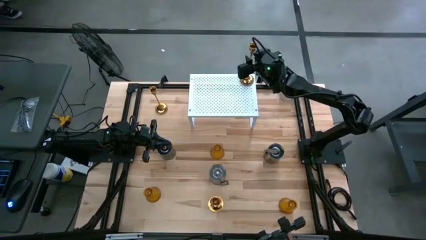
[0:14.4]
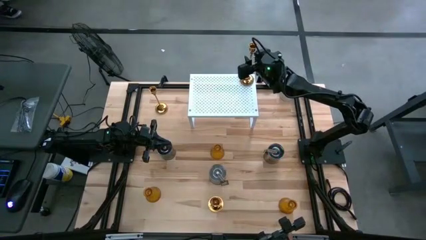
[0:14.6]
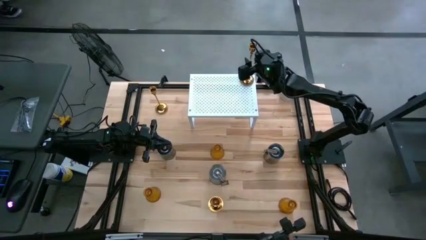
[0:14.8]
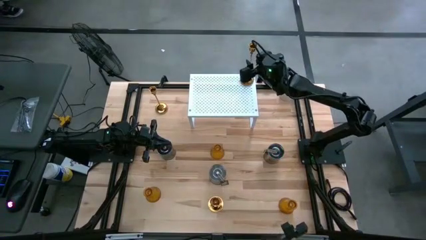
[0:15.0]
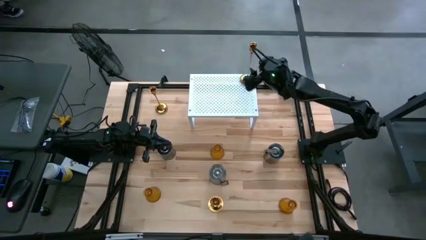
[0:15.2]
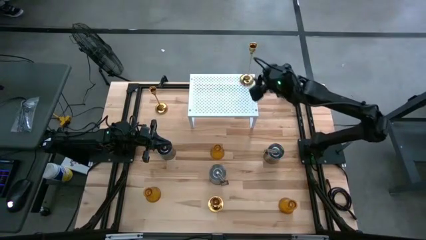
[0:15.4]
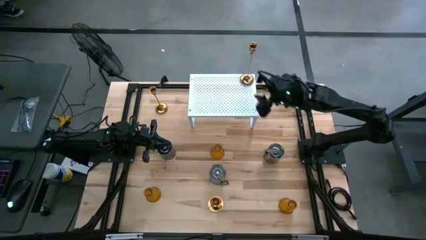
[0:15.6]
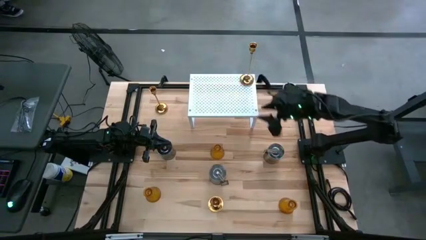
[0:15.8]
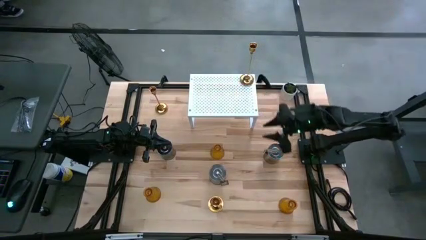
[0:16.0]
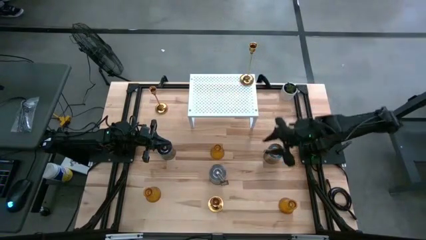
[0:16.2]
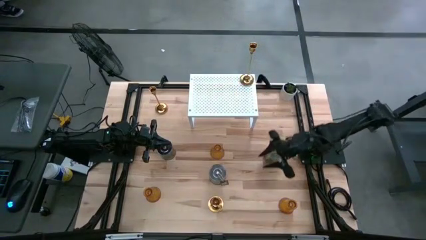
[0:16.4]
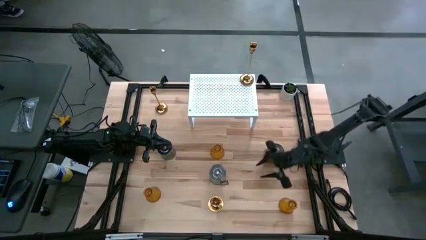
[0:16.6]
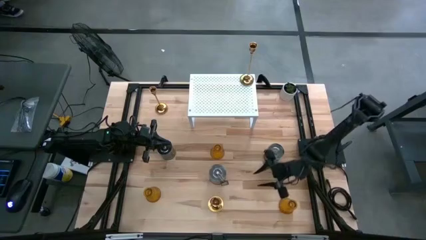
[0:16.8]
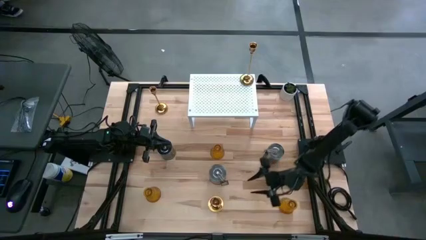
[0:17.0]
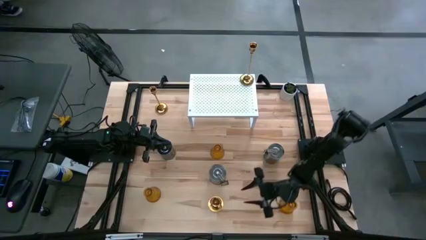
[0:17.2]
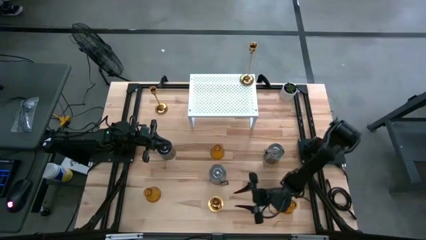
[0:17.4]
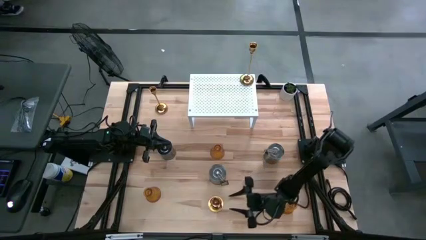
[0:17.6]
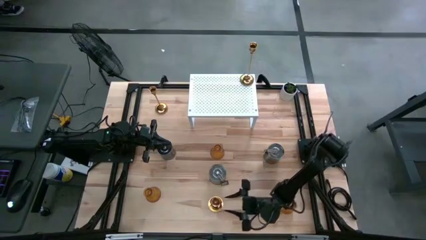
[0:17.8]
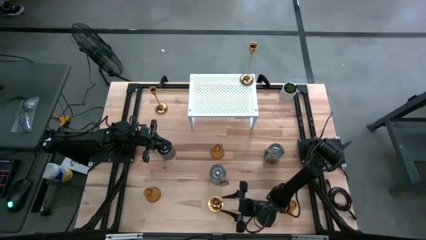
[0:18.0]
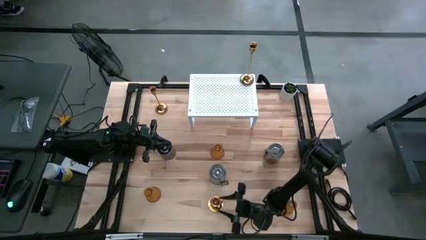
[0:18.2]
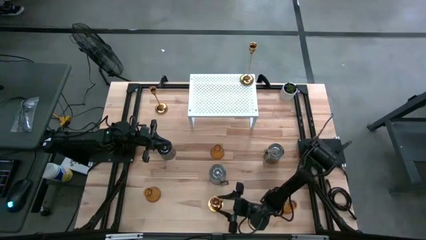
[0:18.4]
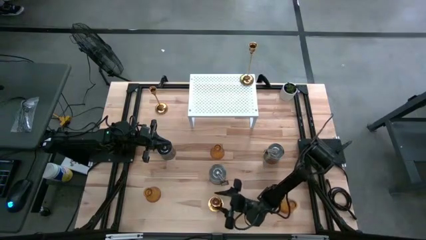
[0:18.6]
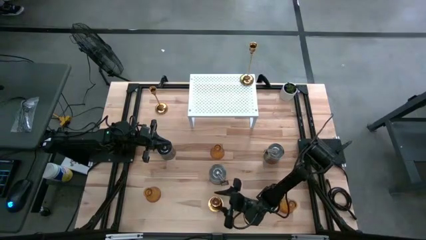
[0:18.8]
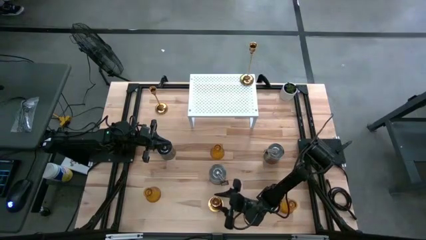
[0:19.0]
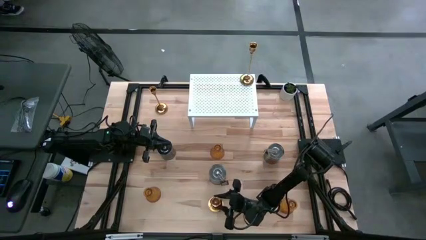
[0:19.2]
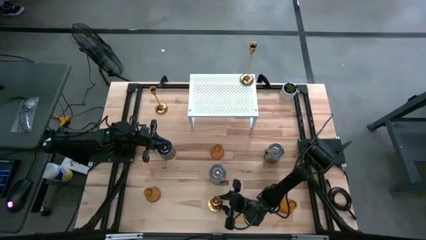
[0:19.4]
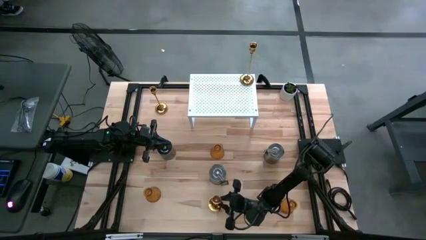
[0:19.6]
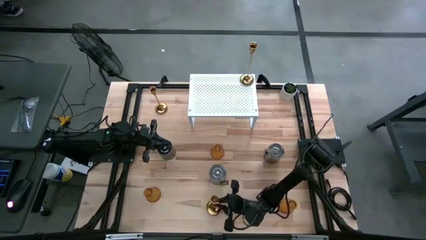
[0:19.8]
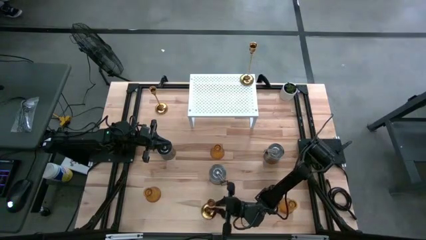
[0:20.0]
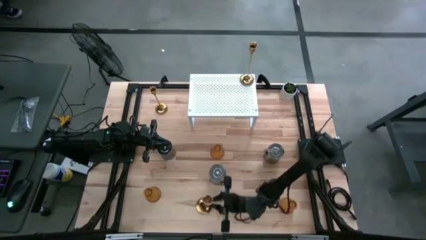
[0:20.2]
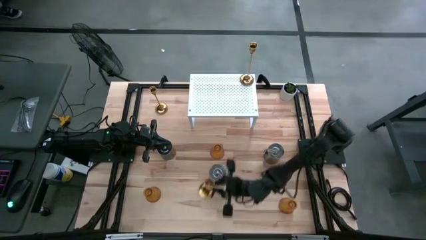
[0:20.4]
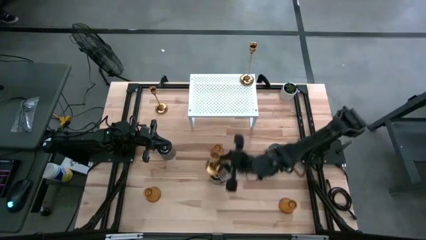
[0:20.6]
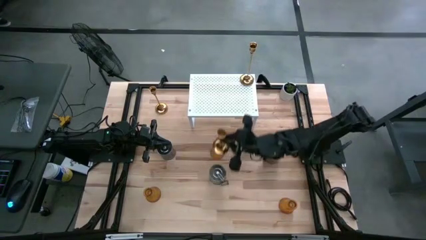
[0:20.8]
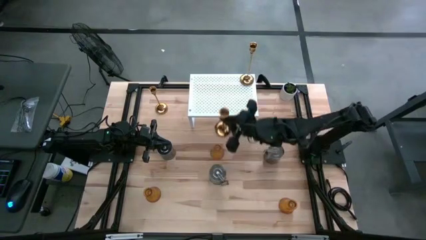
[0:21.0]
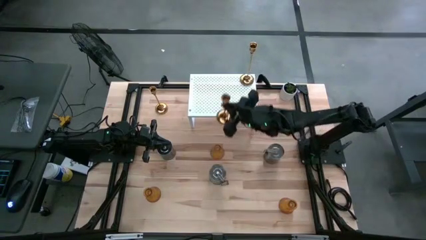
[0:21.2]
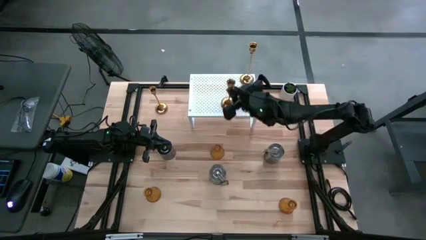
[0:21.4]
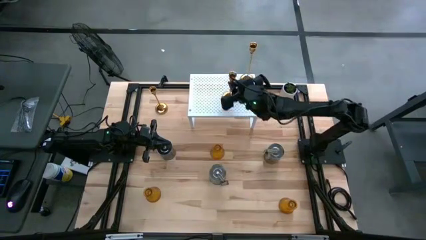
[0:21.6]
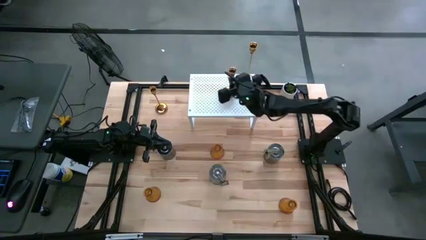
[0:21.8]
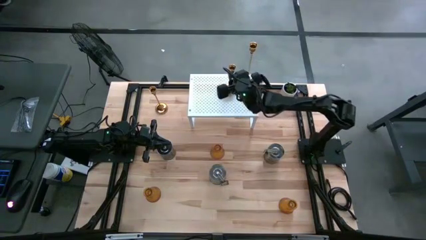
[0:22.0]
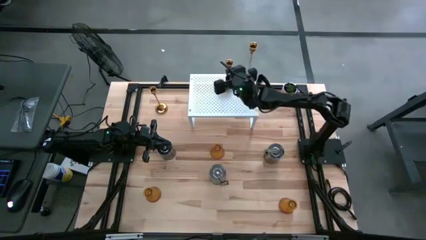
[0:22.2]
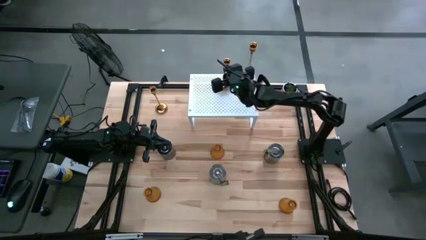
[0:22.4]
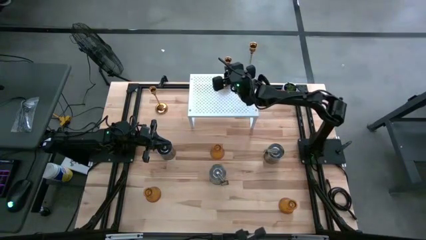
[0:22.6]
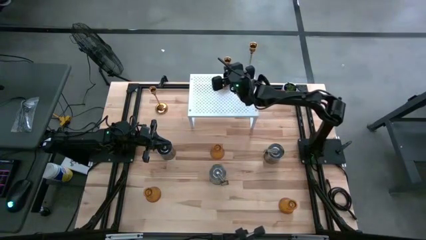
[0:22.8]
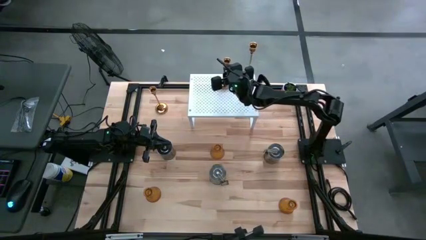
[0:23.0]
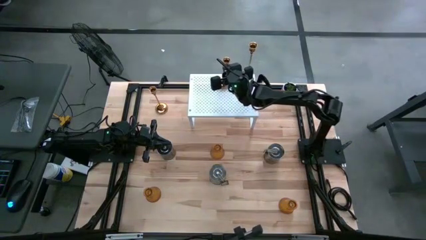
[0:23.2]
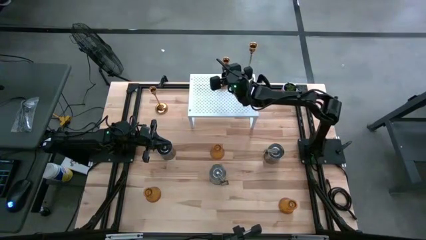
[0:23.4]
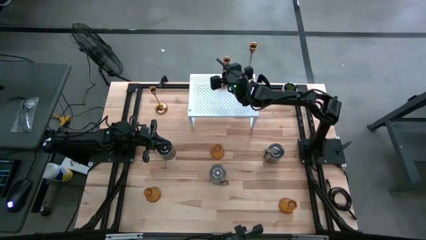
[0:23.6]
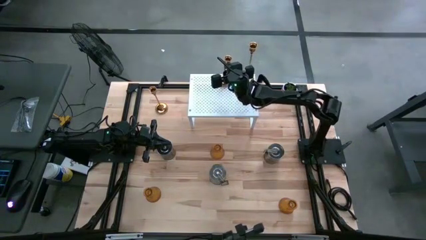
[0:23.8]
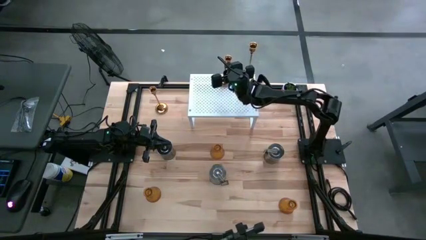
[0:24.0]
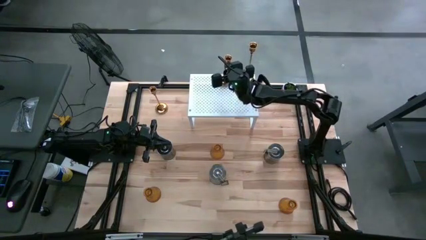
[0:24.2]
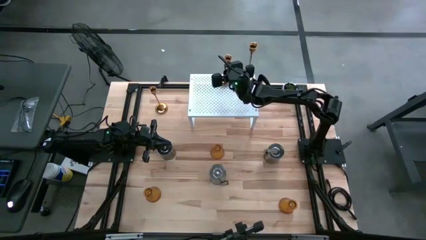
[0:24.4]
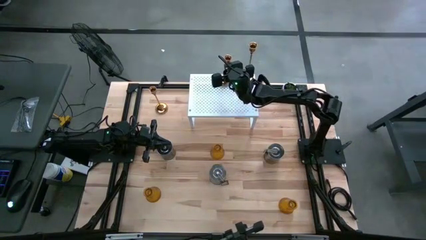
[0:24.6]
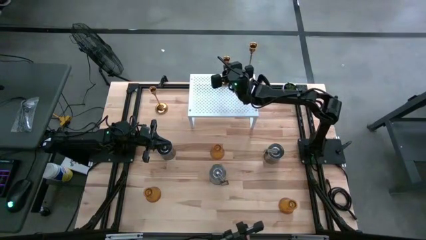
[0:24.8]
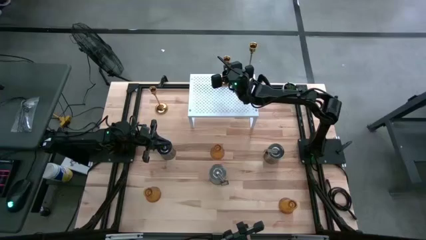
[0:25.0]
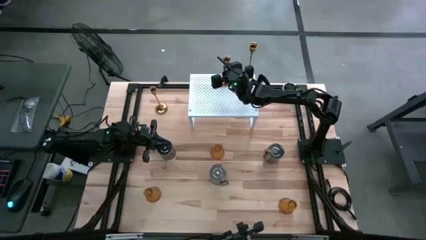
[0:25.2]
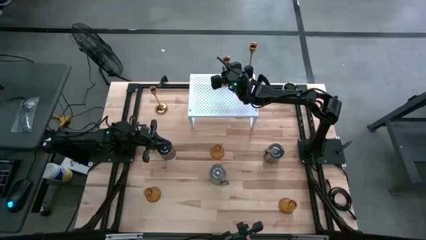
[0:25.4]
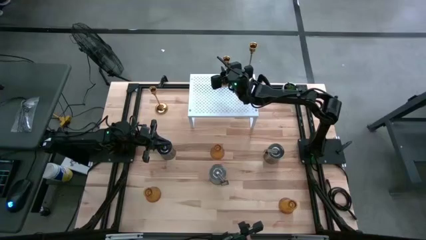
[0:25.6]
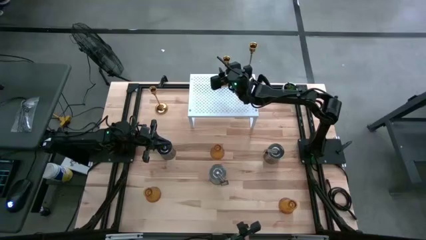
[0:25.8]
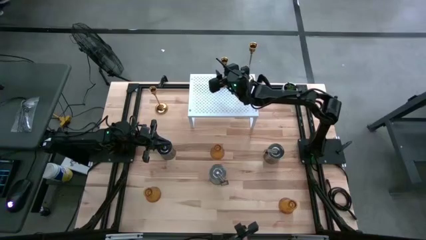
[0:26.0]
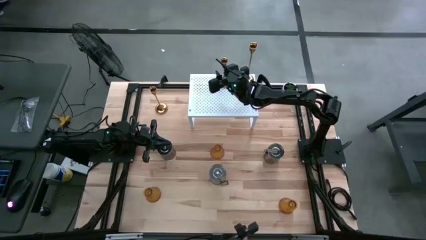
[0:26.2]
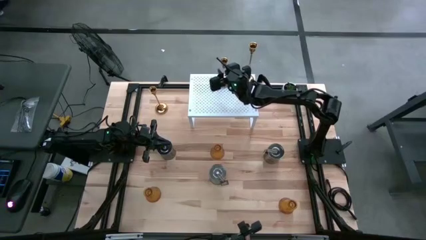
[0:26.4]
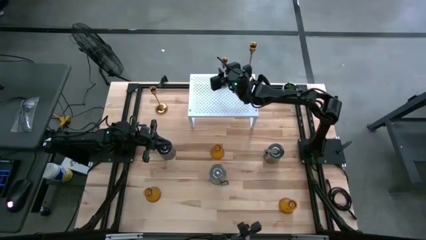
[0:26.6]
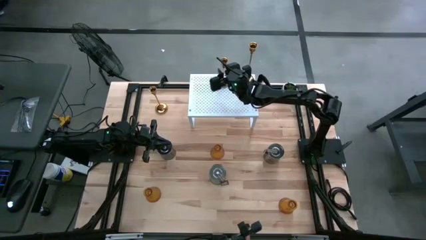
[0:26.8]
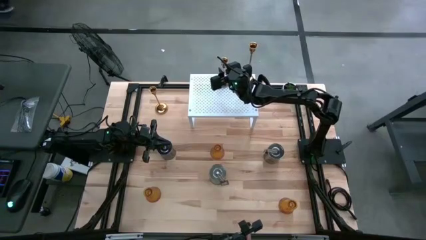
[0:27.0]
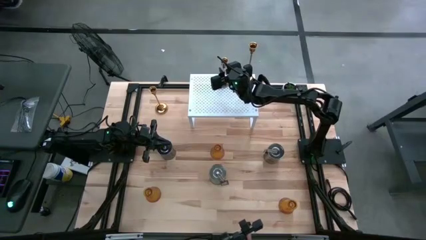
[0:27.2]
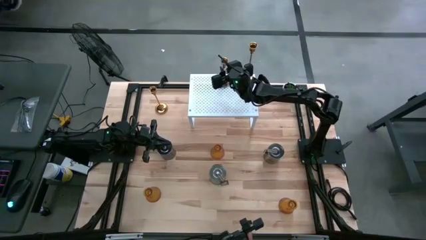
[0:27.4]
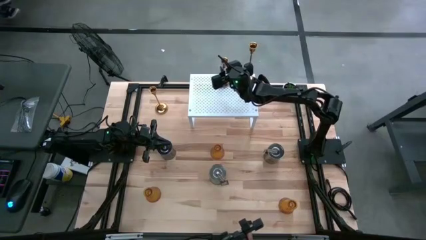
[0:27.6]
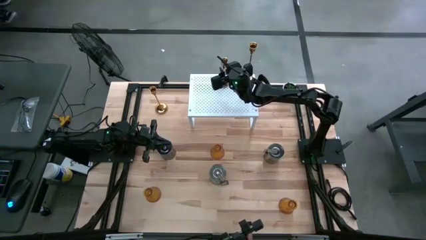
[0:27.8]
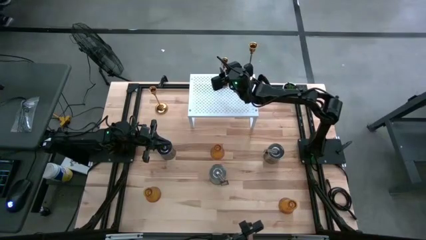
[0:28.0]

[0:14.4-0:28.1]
Task: Pick & Place candle stick holders
Put the bottom center gold candle holder on the shelf

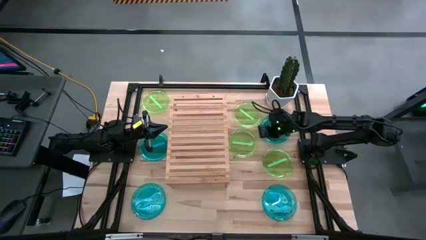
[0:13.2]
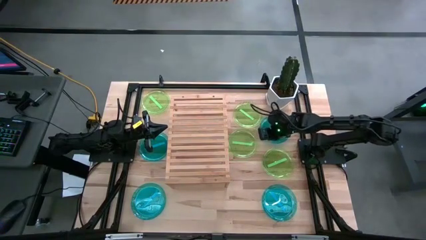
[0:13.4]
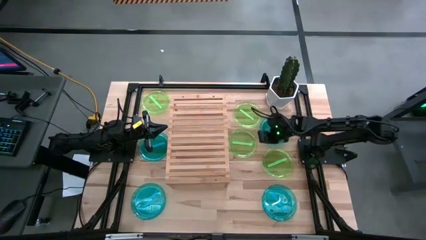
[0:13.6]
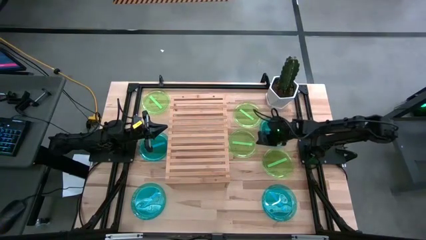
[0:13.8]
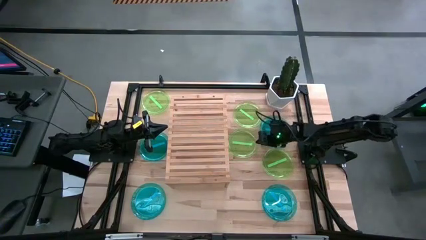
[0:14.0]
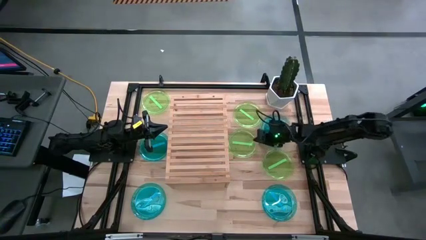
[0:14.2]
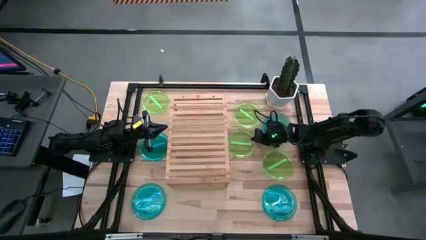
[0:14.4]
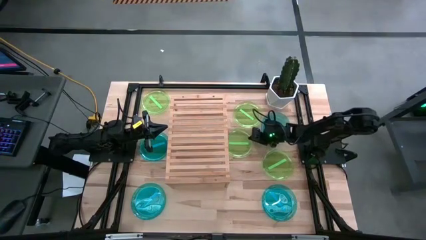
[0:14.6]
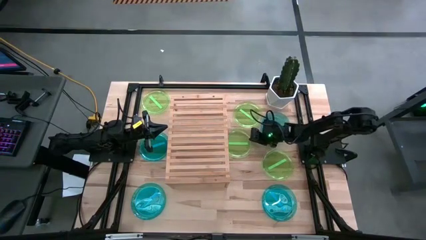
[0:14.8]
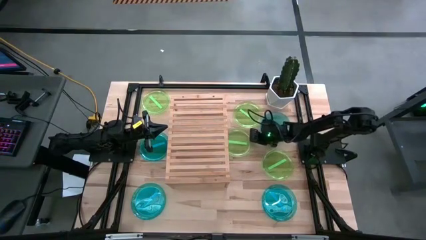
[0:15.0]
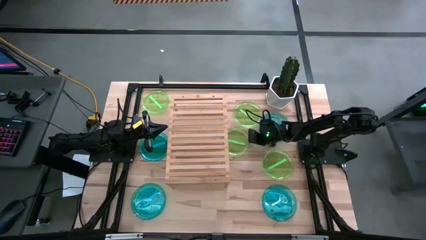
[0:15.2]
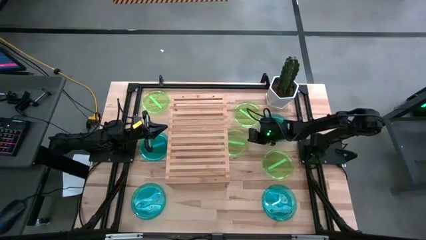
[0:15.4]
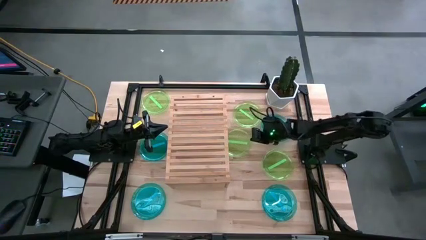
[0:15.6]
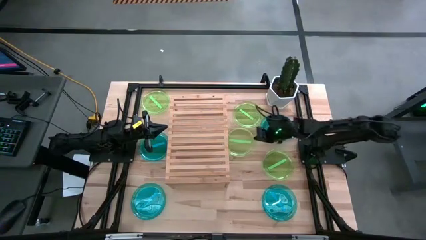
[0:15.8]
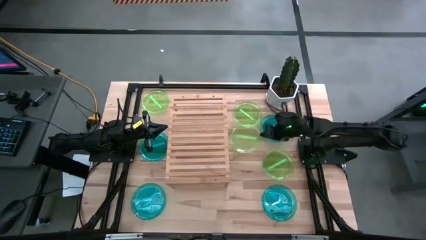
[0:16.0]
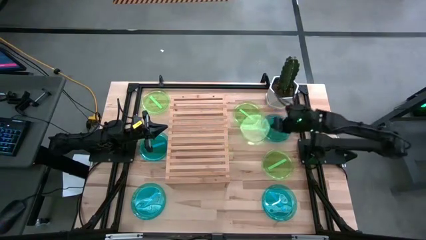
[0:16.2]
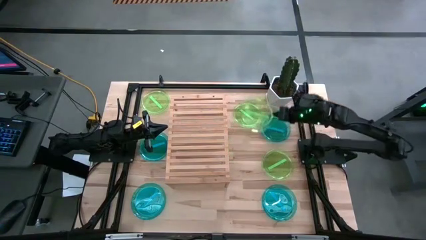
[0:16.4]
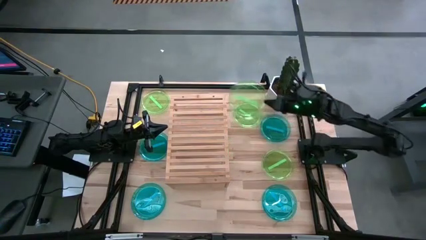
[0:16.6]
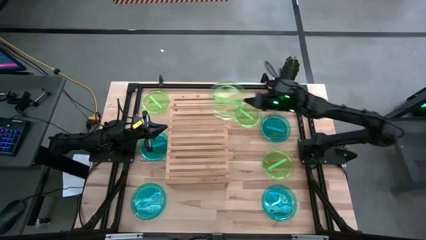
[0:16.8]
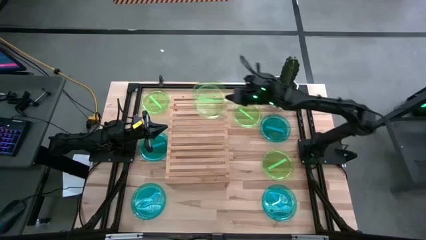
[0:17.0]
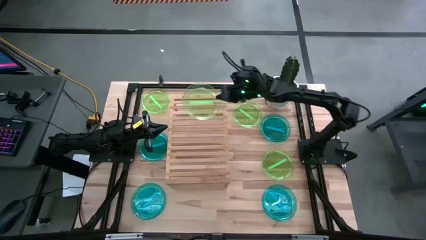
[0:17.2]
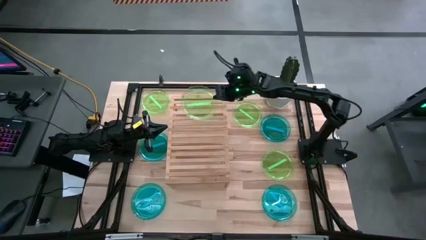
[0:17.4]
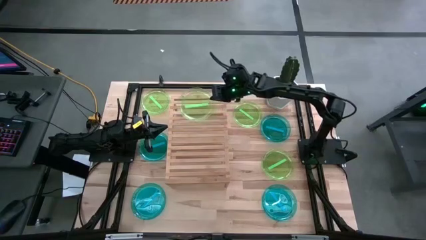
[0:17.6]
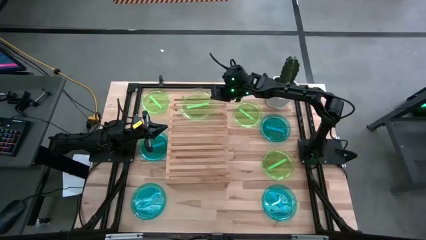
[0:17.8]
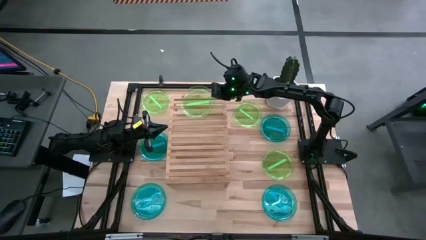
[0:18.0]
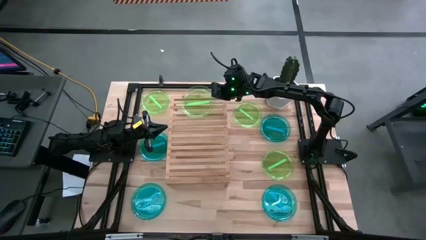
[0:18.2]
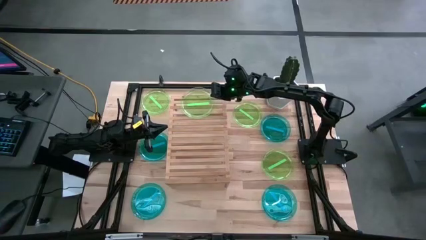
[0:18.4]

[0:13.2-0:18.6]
Task: Place and stack plates onto a shelf
Put the middle green plate on the shelf
